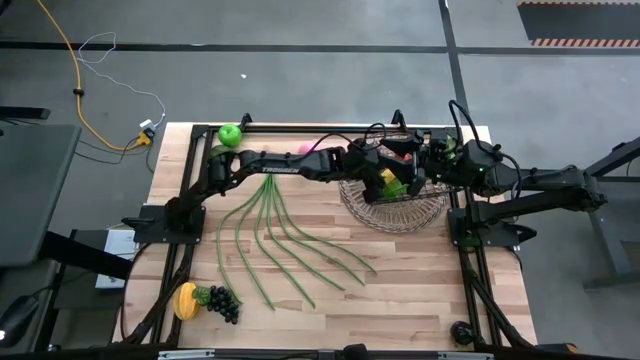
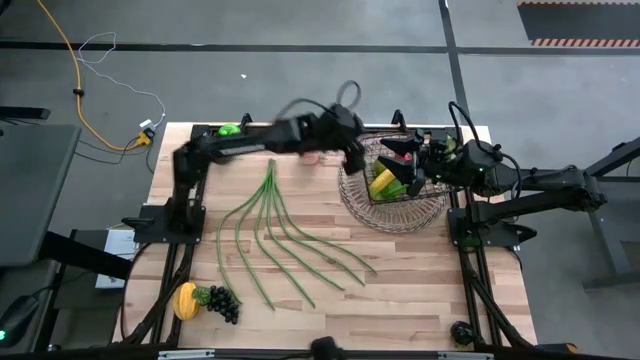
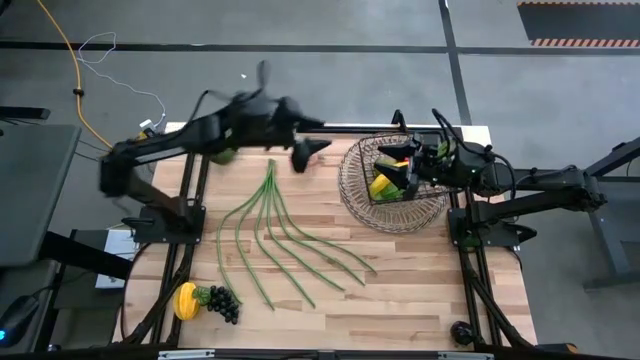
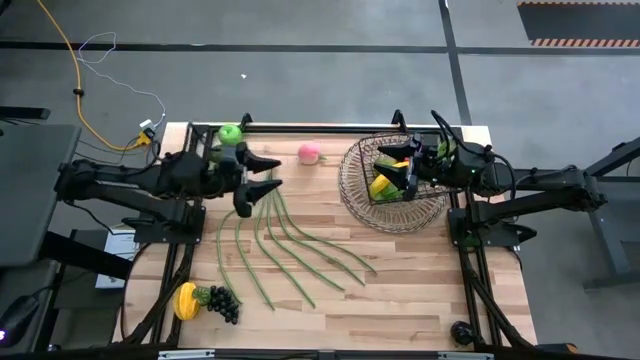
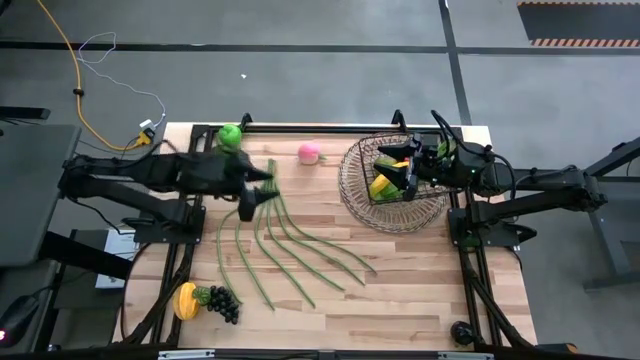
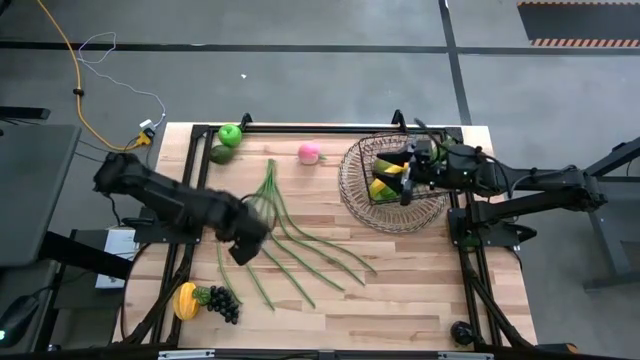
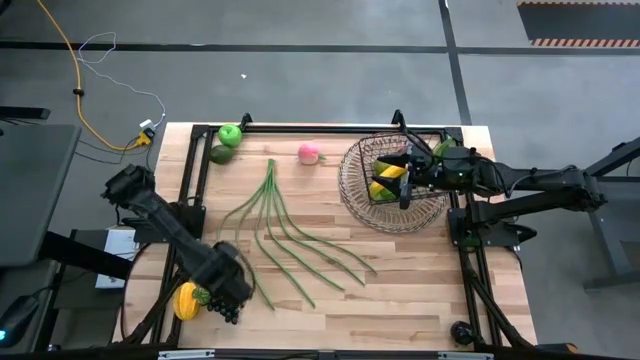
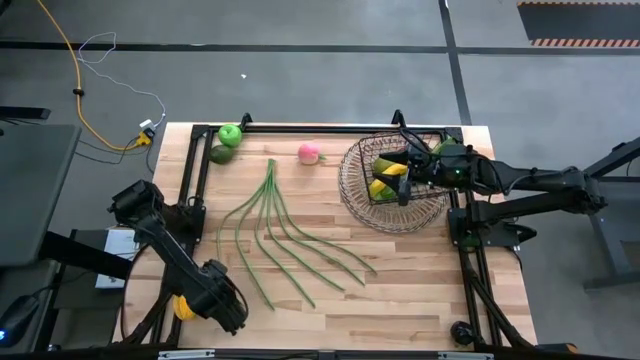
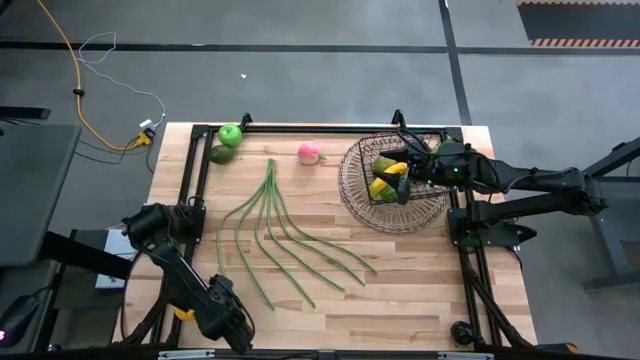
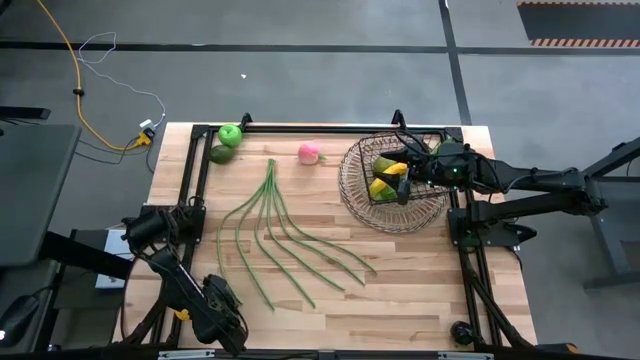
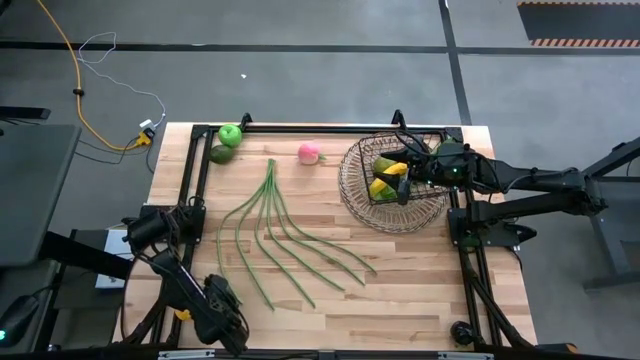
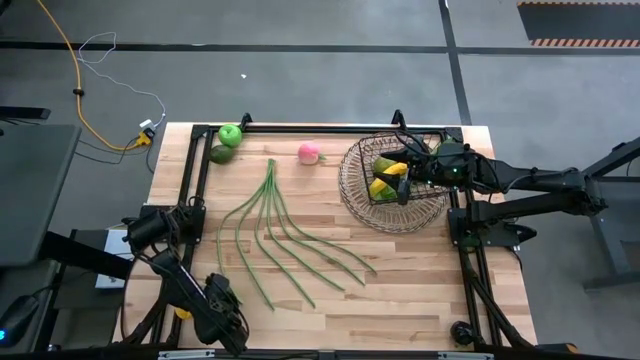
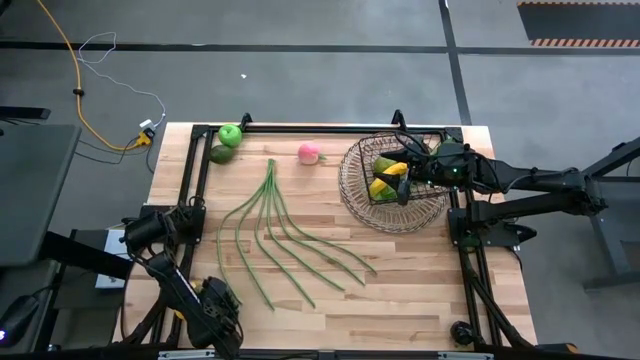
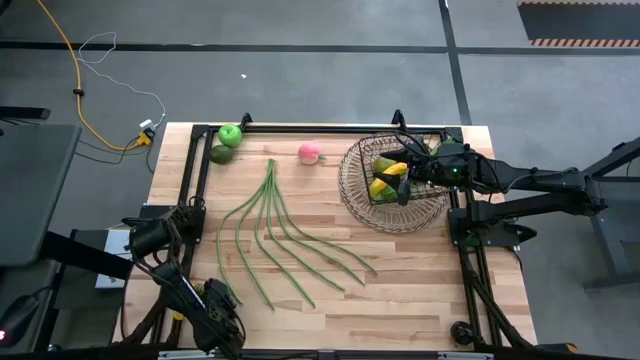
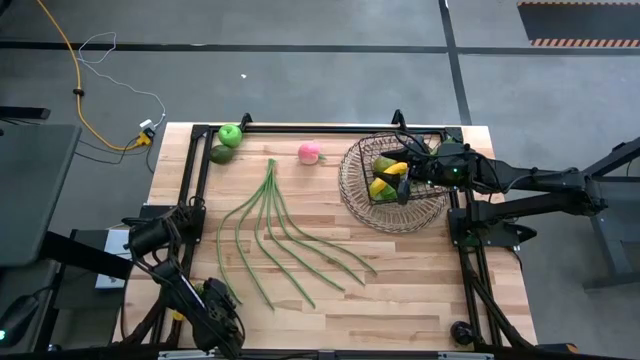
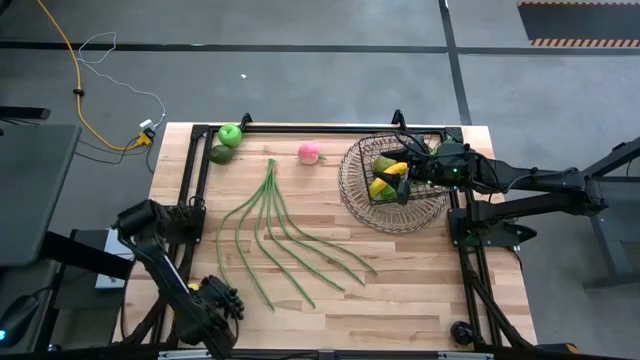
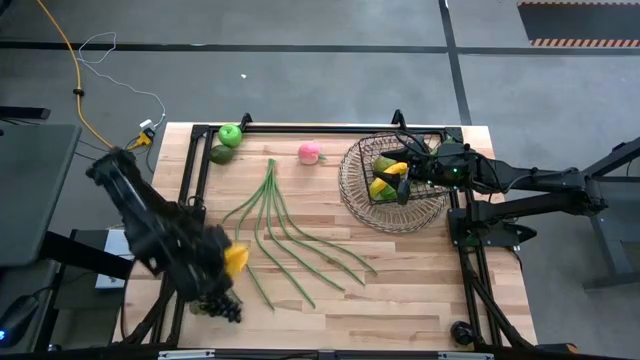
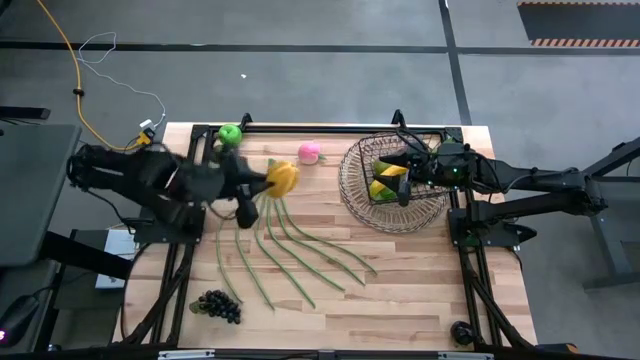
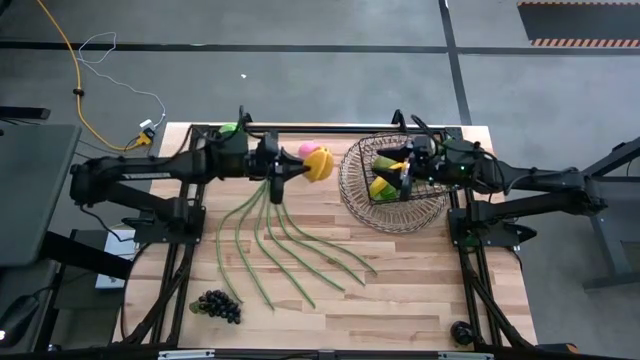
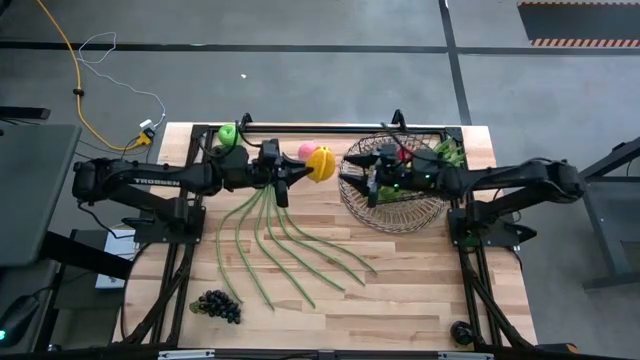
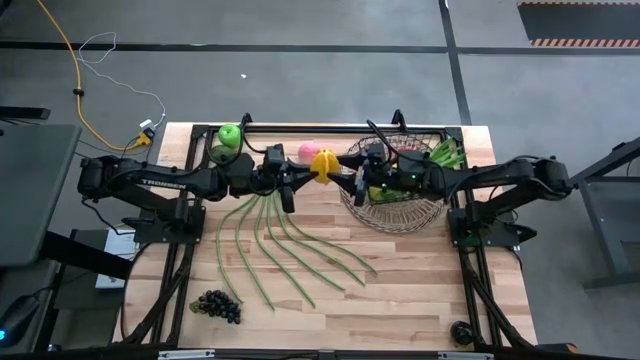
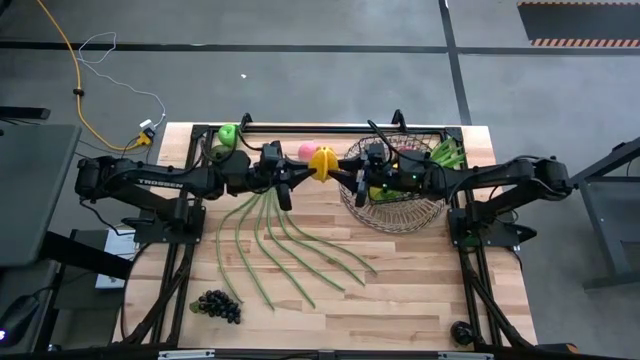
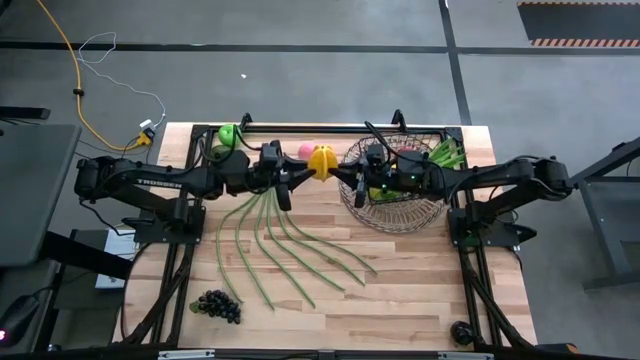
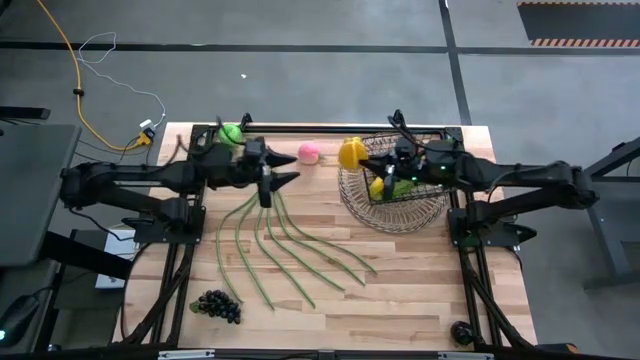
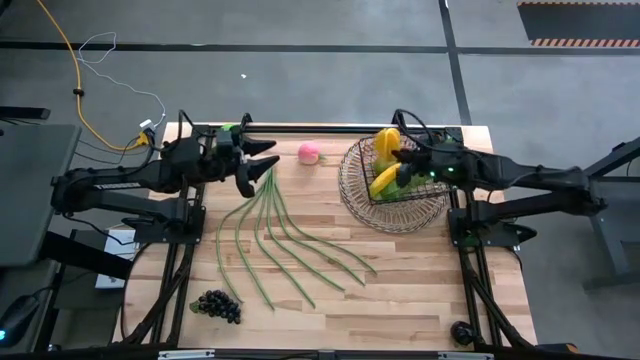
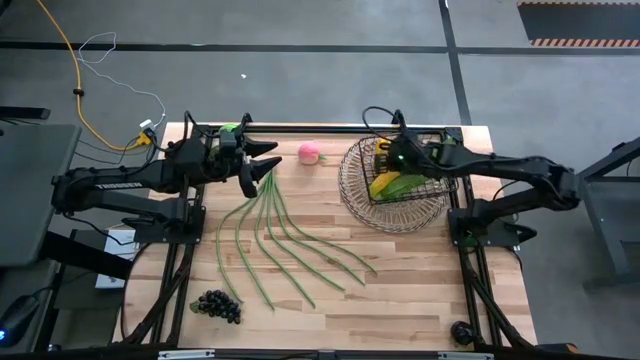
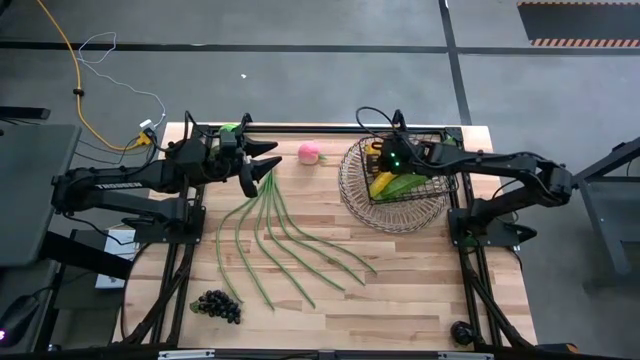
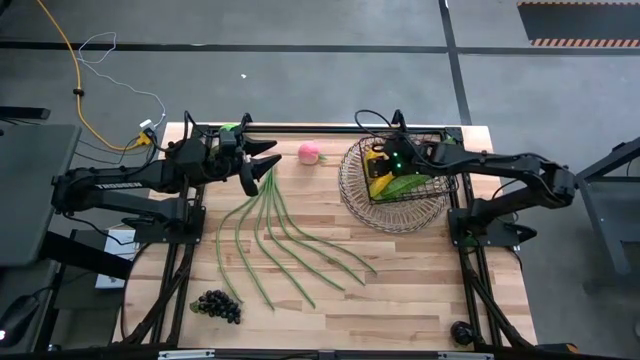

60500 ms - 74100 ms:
Task: Build produce basket
Put the yellow starfruit into the wire basket

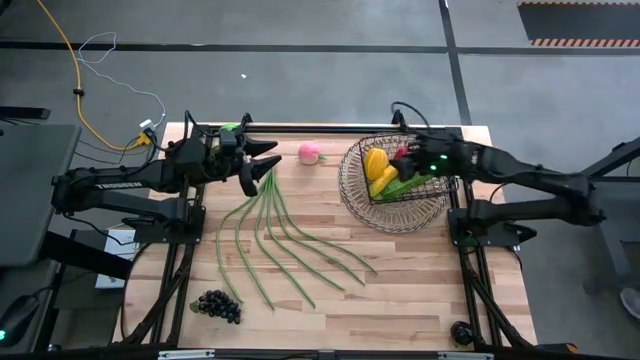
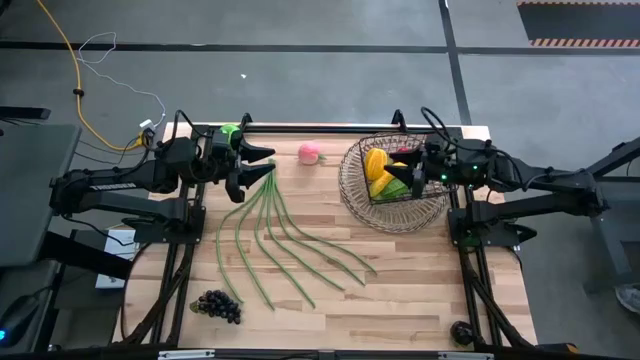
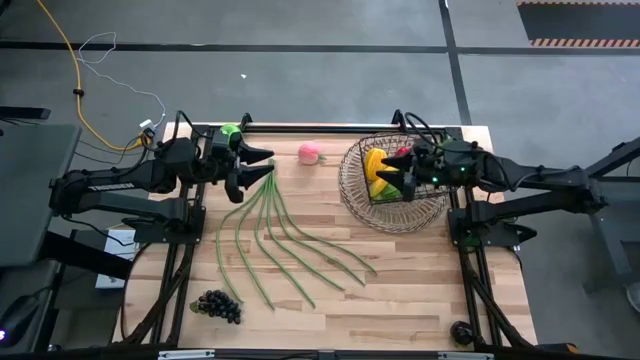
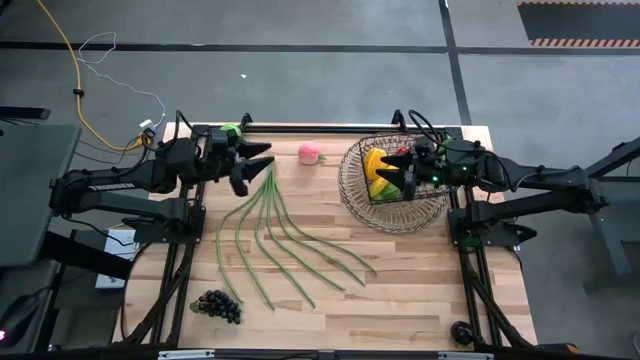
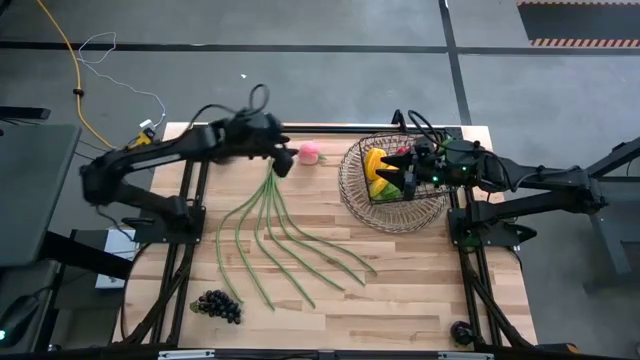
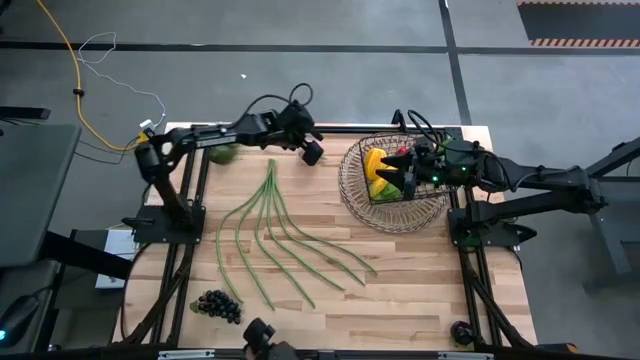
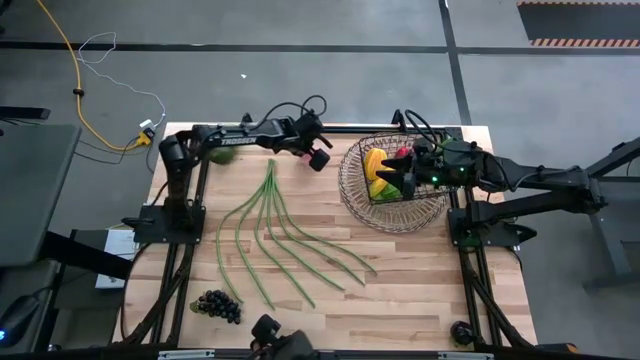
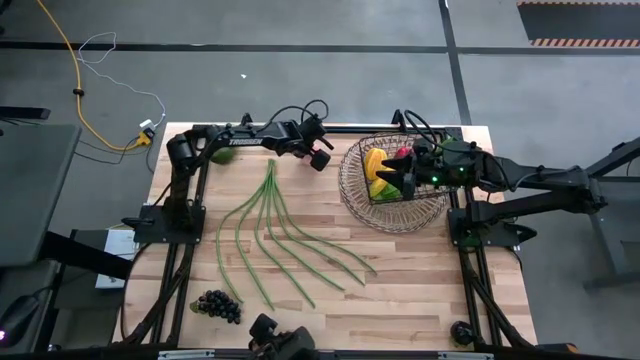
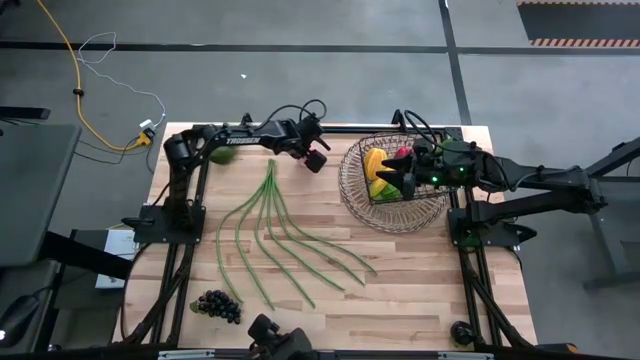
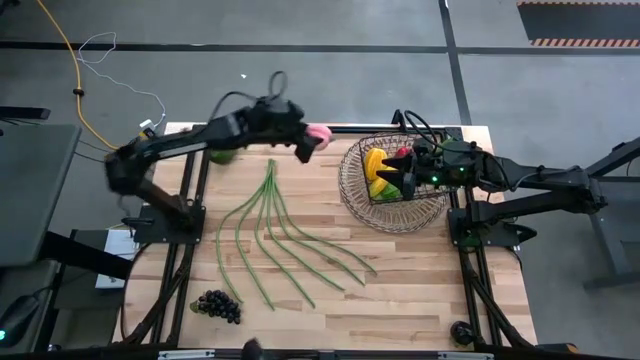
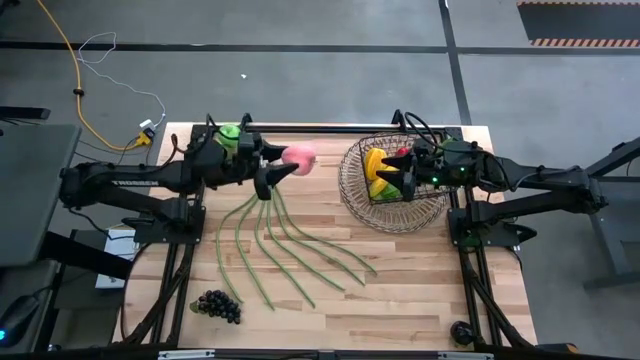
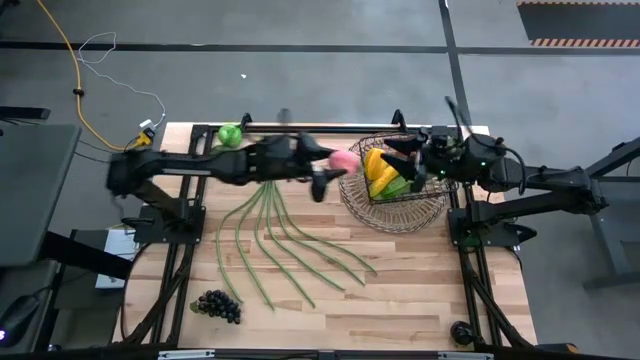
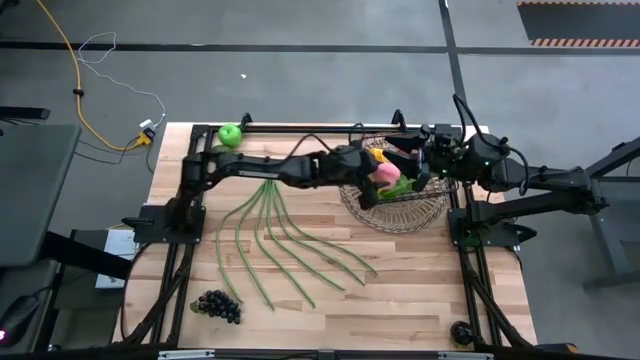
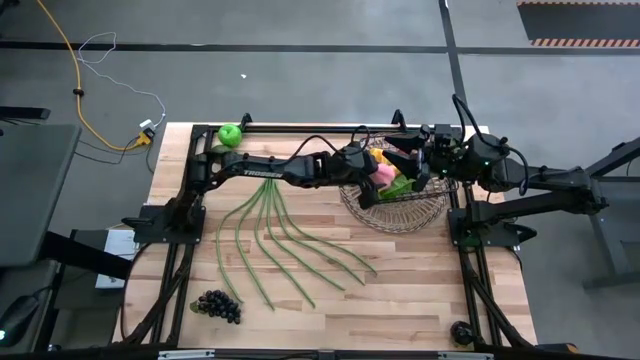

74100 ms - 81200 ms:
Put the pink peach into the wire basket

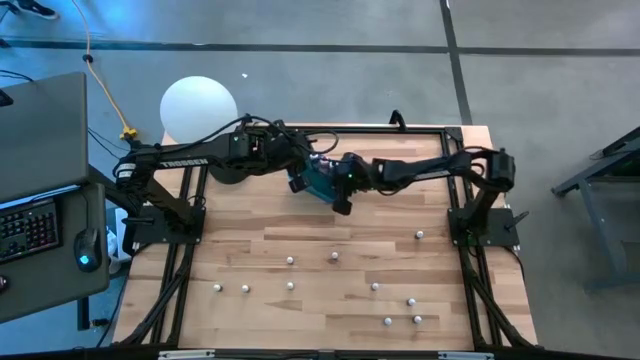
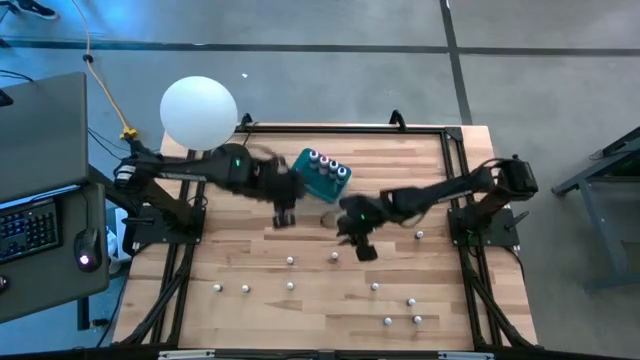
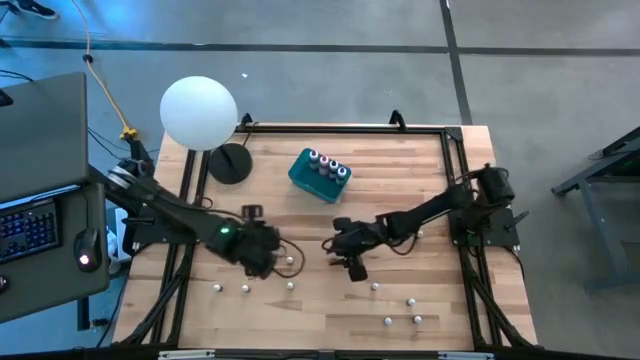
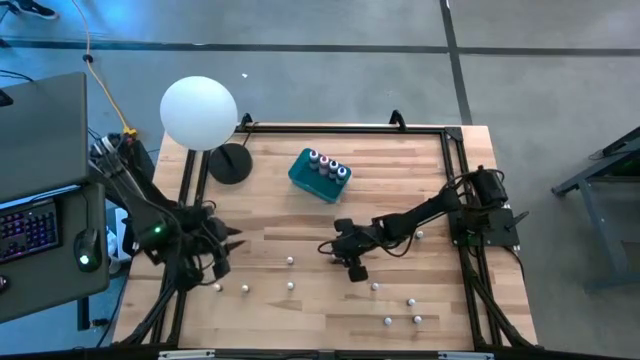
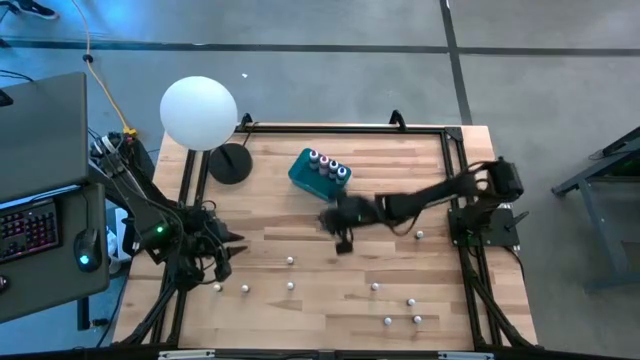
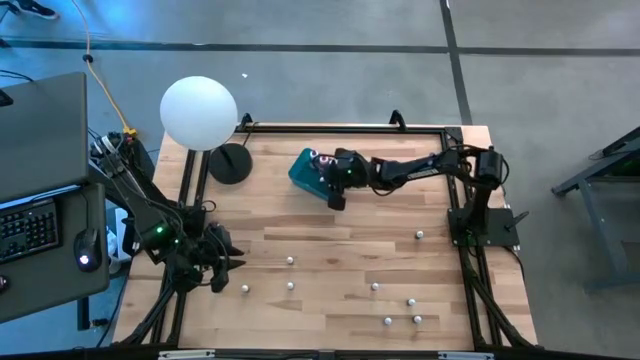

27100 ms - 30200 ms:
Task: Pick & Place food coloring
Put the black food coloring into the blue bin
